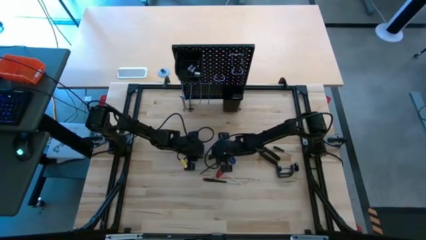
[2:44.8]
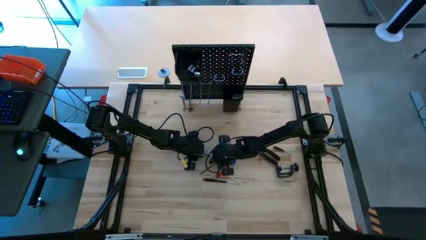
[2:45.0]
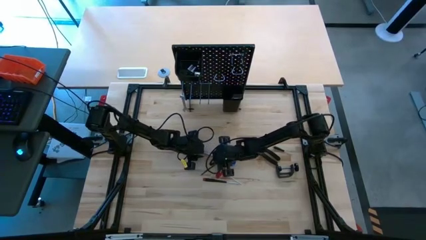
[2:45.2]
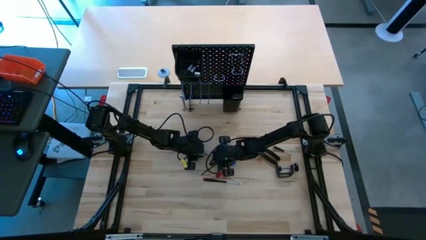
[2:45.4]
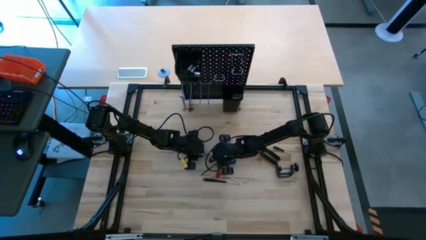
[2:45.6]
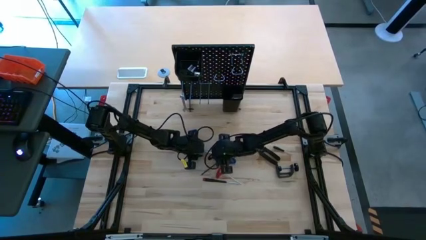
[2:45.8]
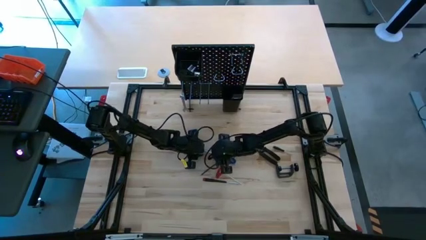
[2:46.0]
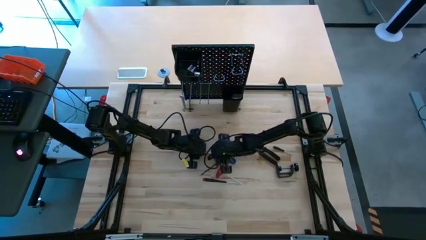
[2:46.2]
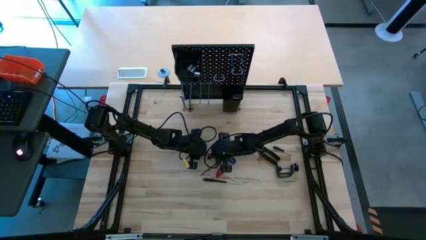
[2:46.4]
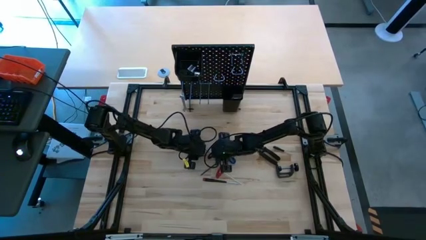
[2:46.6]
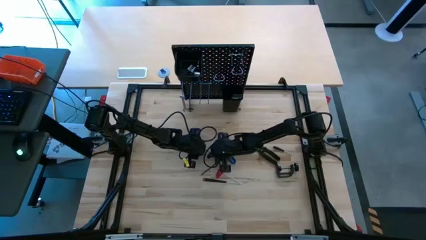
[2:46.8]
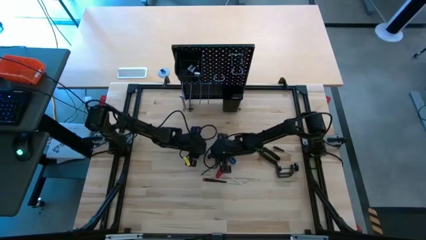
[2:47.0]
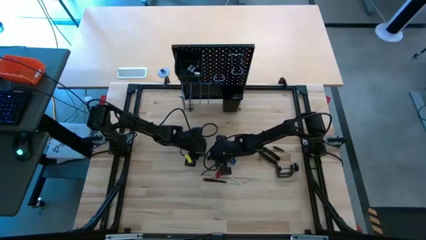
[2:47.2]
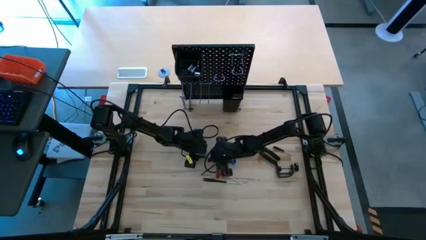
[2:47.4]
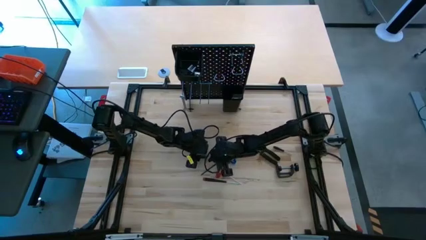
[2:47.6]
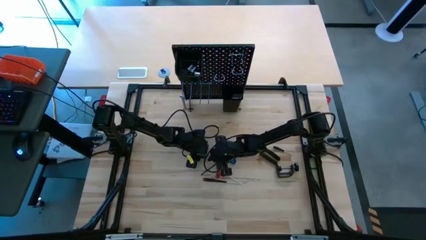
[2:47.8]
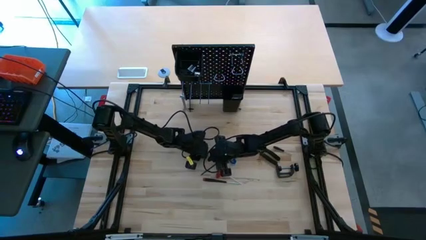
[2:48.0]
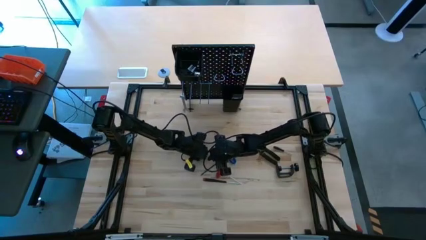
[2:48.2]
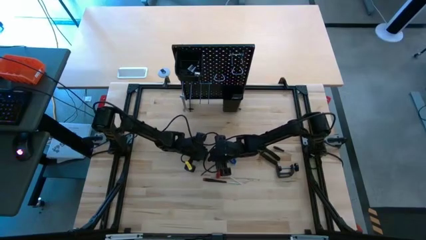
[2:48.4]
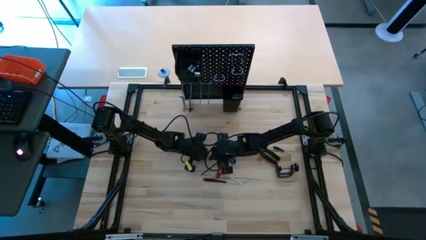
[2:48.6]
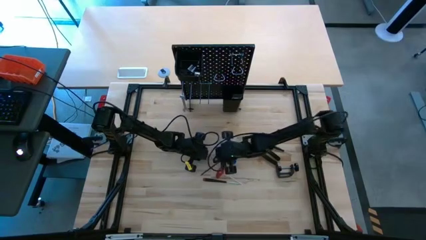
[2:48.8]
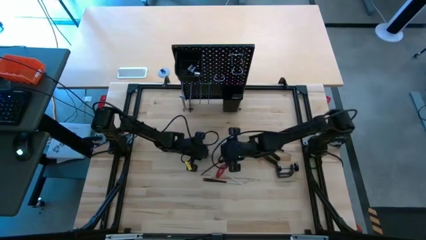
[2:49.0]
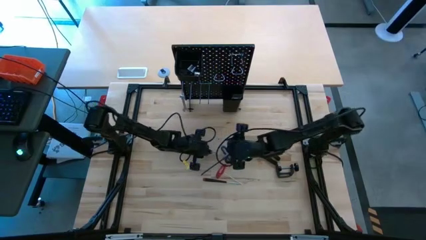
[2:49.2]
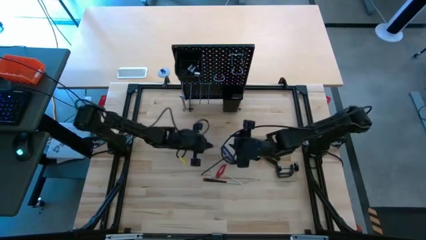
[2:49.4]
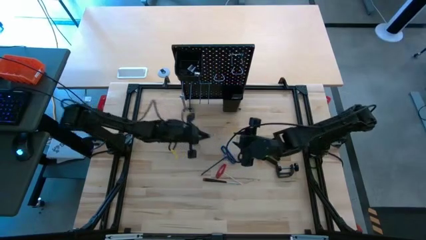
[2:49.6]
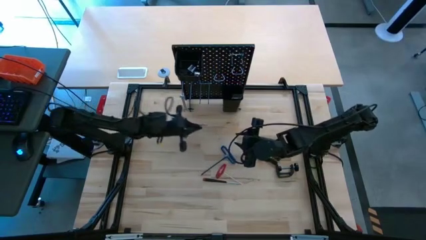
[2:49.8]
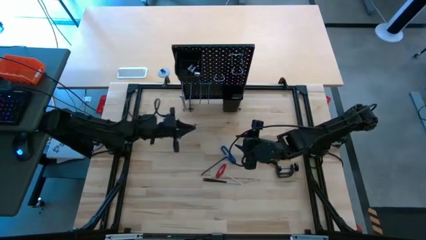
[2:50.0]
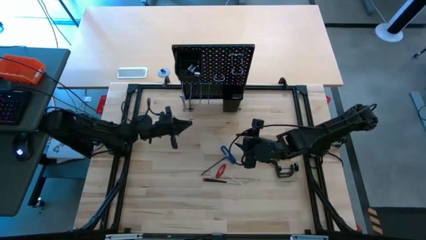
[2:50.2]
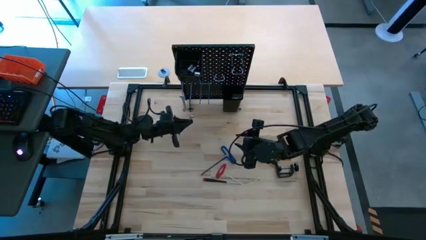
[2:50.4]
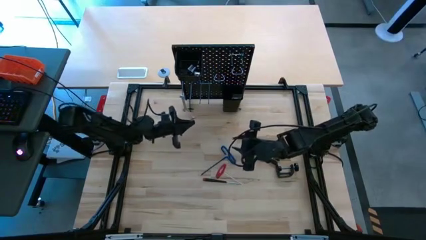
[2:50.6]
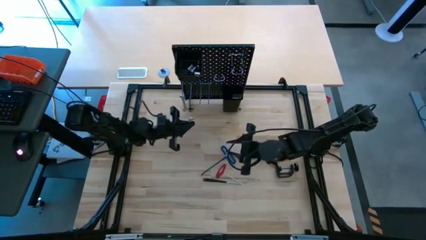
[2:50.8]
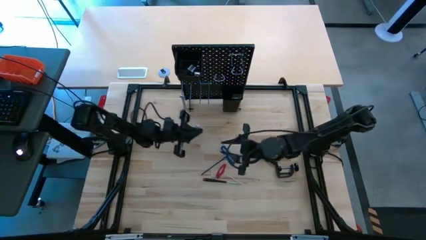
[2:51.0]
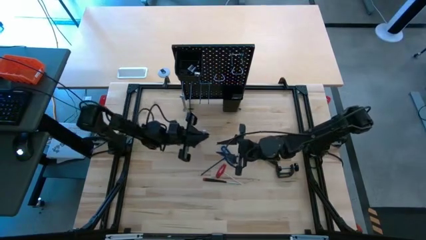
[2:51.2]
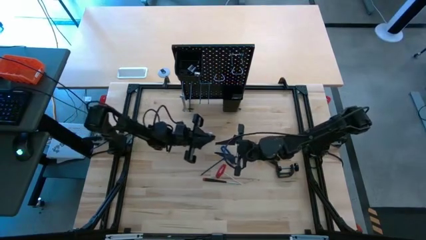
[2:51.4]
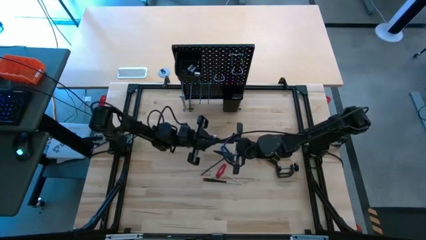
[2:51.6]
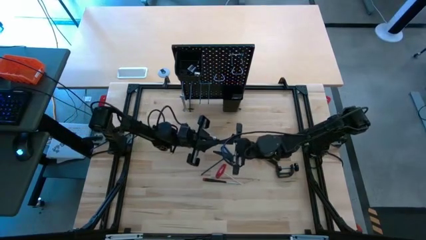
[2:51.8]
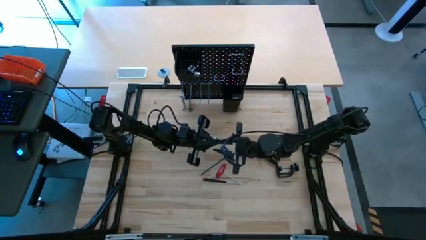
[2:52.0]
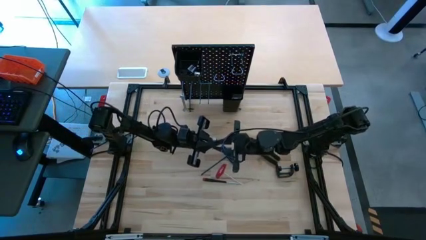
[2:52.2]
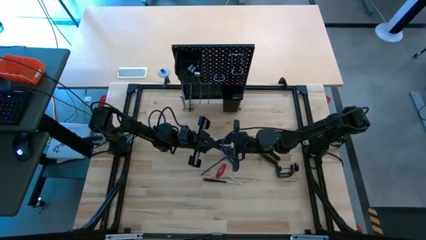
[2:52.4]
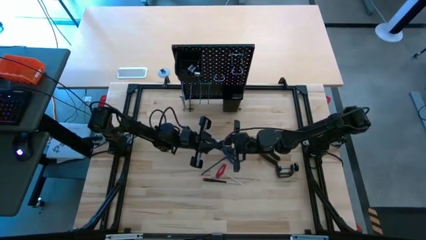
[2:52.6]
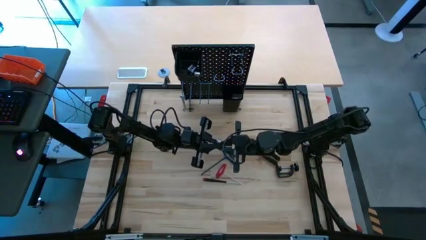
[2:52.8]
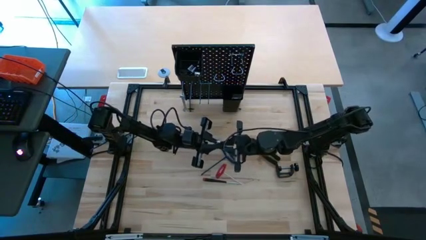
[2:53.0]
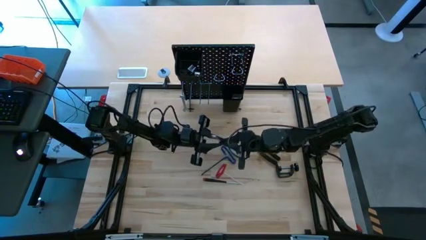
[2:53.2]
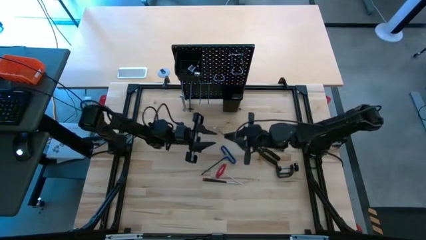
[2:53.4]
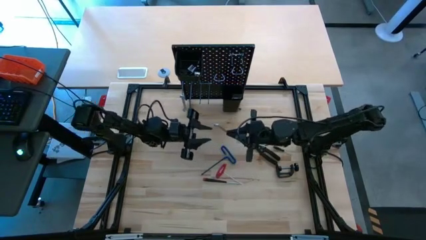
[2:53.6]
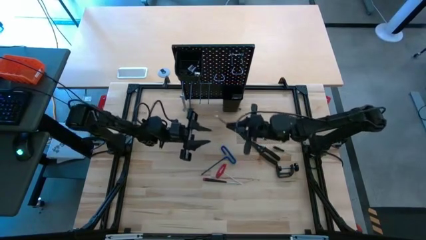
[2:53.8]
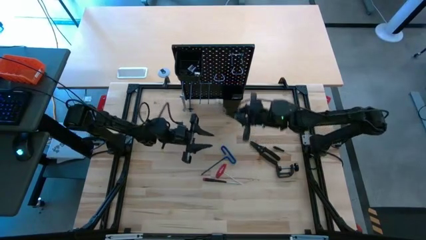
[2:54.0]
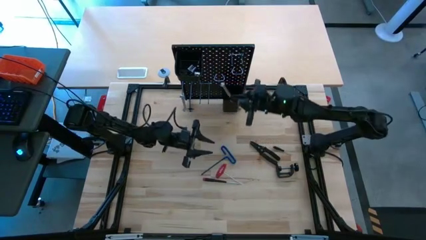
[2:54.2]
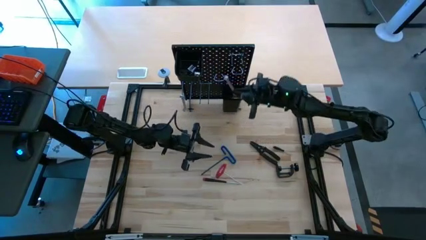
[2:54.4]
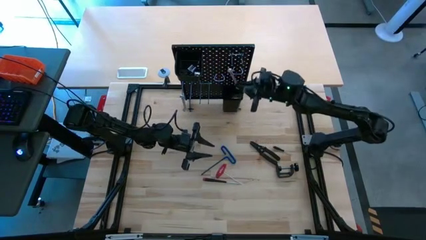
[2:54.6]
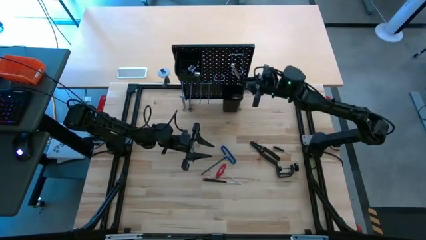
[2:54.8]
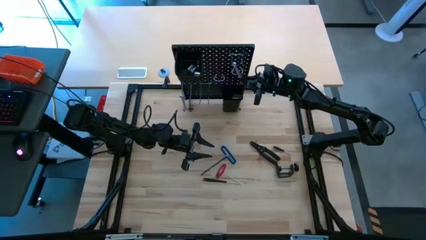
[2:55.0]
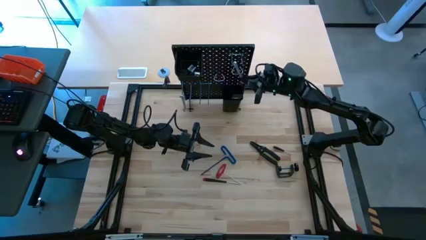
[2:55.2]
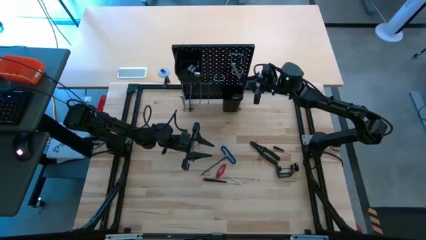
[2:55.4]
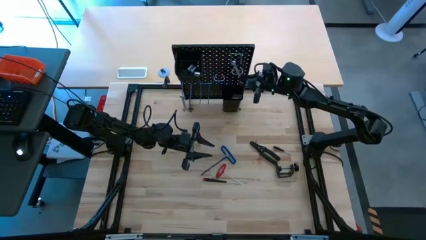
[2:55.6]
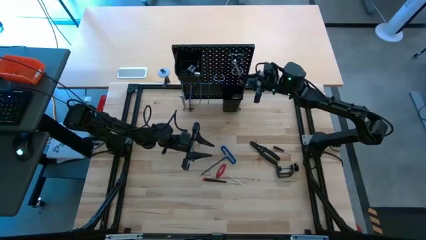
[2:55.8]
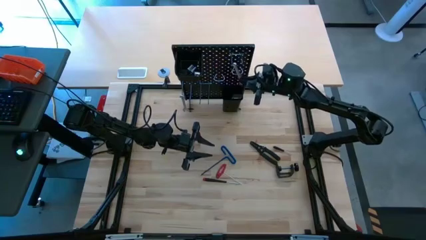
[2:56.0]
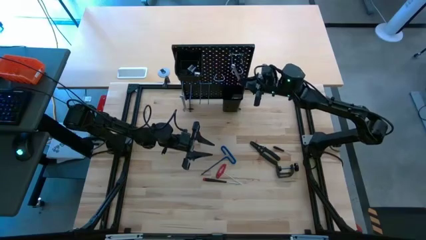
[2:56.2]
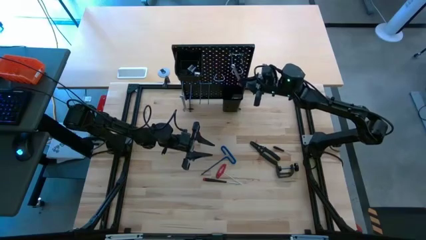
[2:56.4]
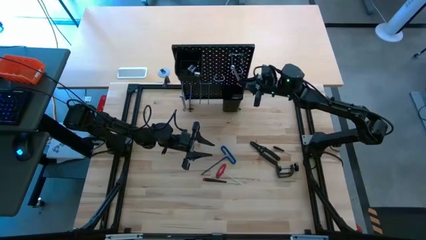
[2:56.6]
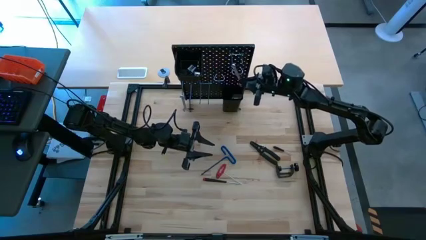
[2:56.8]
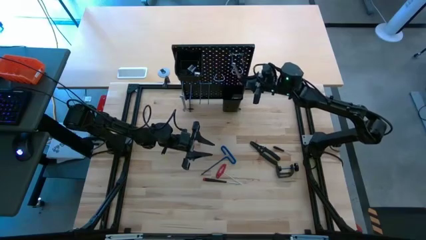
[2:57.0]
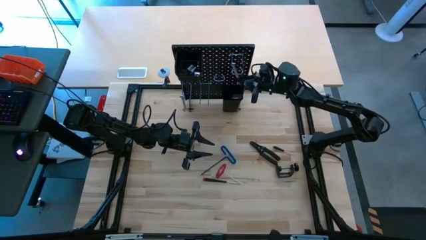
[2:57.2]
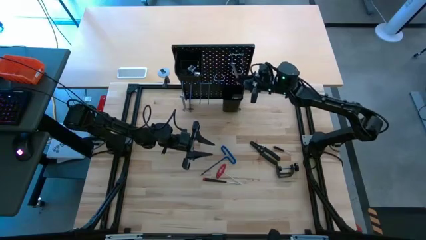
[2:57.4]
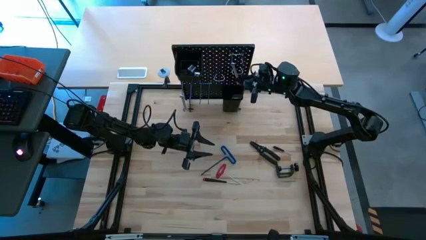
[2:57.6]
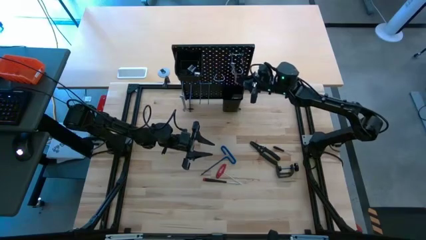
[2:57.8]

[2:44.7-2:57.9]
Task: Hang tools onto peg board
Hang the wrench on the pegboard
